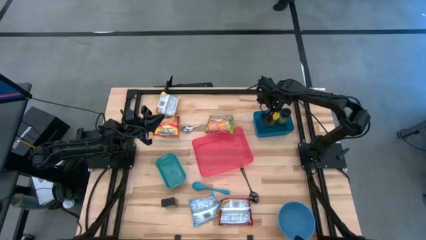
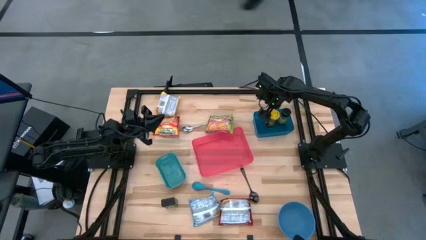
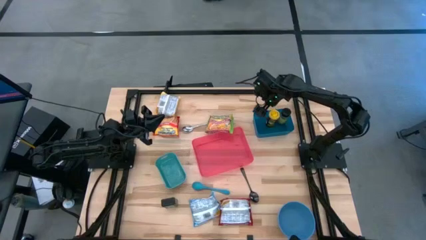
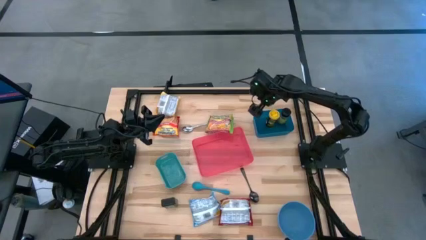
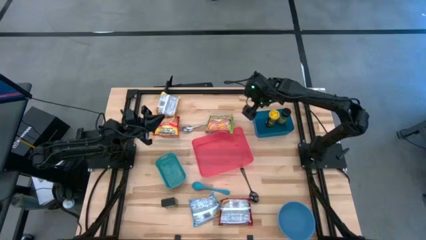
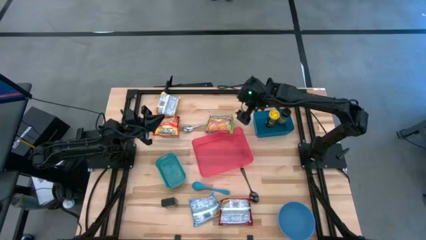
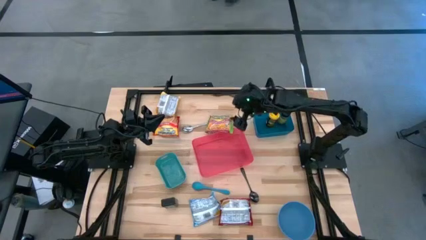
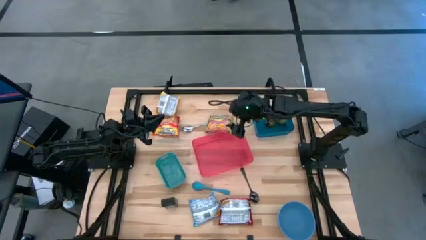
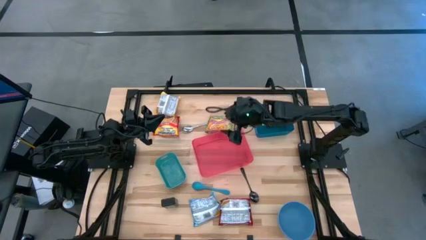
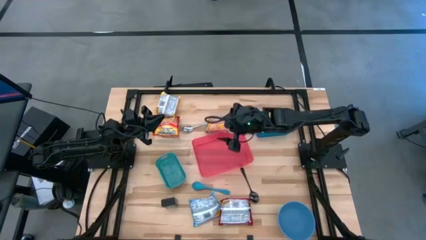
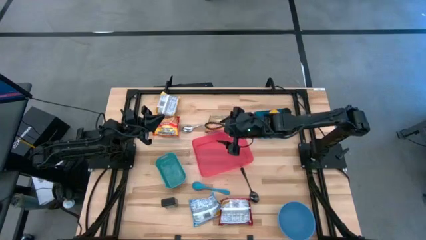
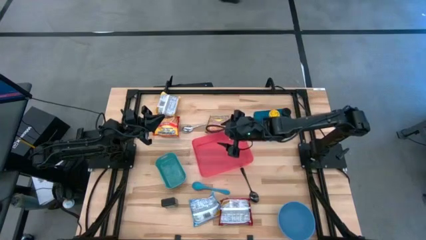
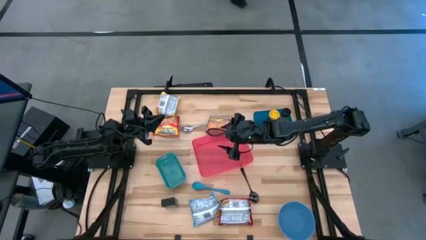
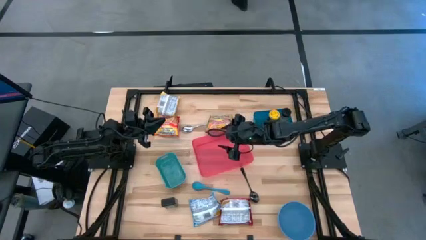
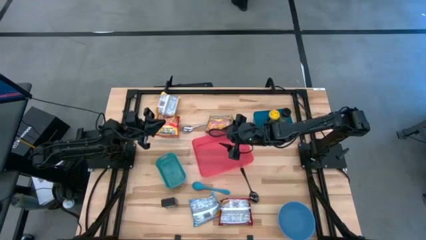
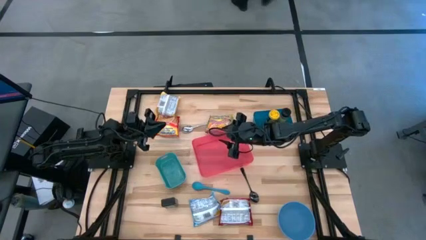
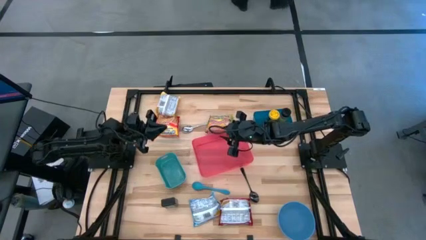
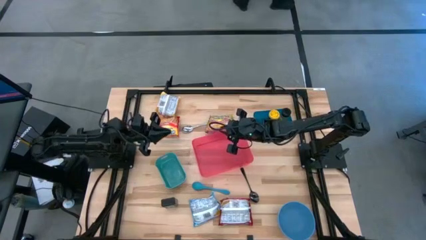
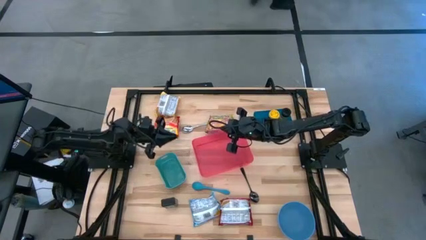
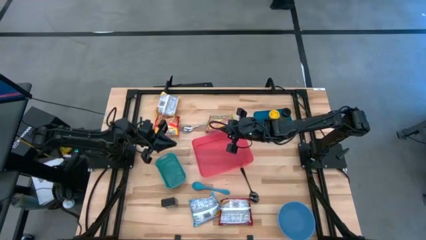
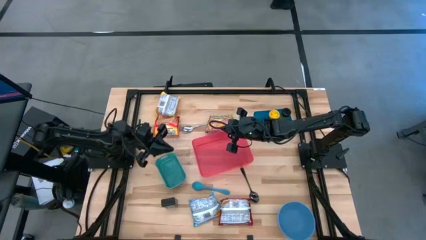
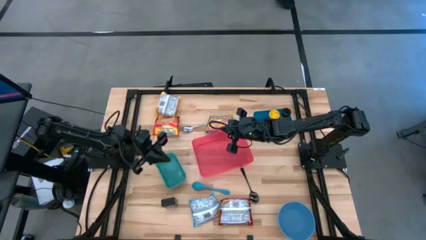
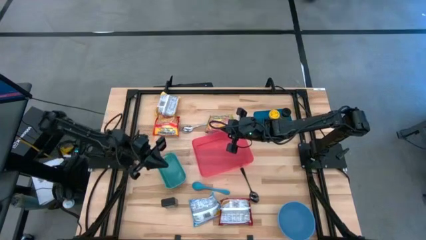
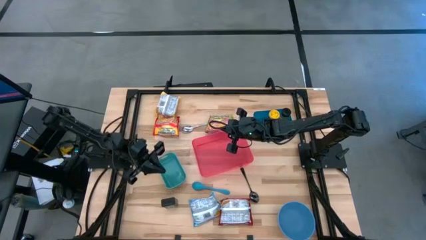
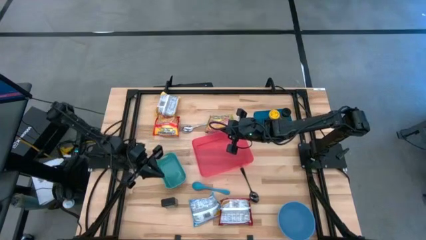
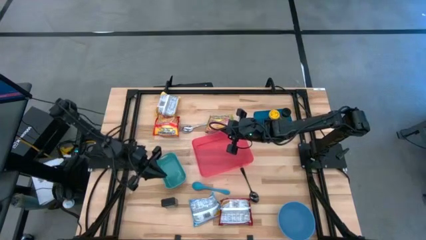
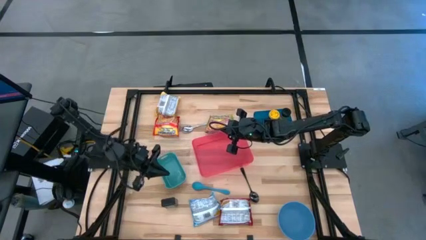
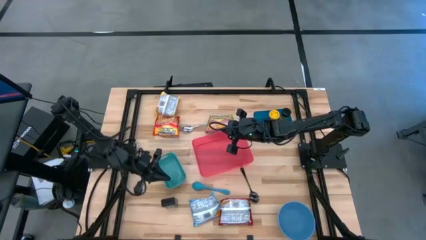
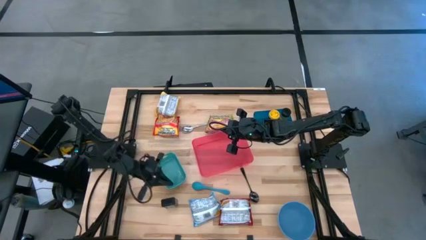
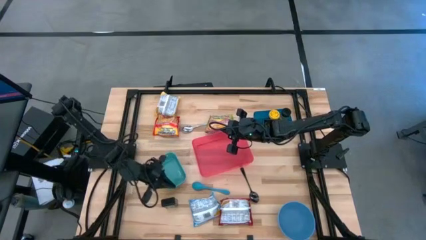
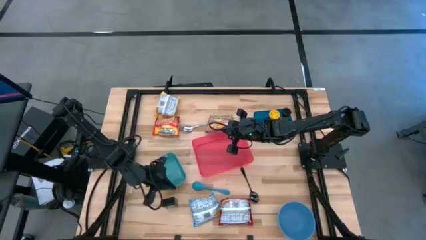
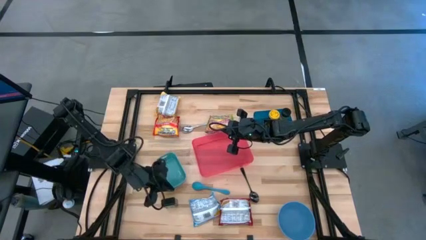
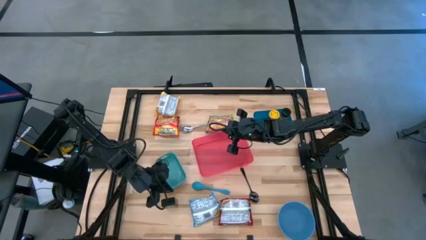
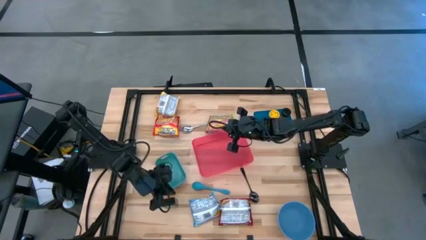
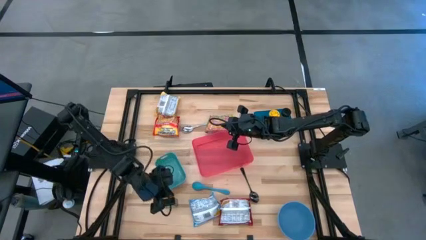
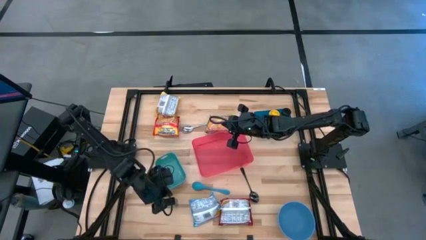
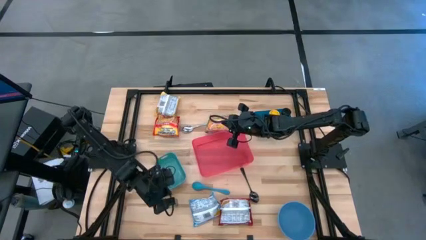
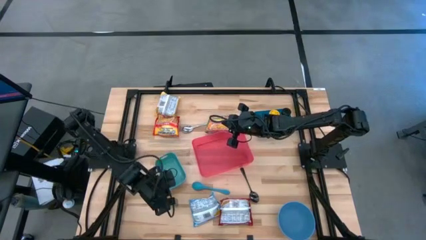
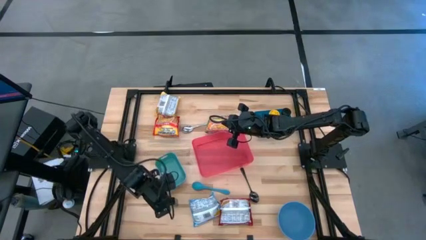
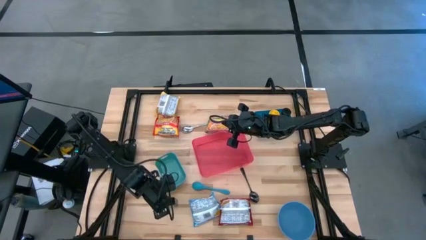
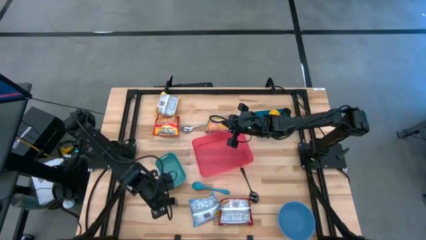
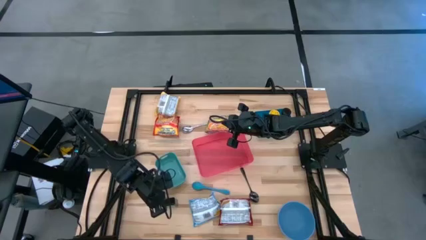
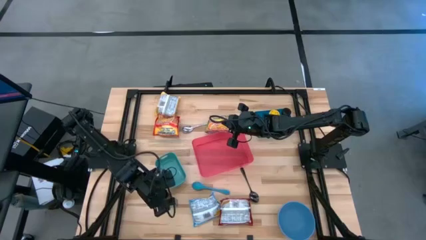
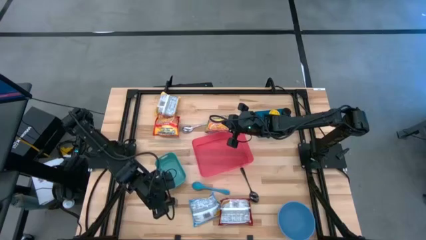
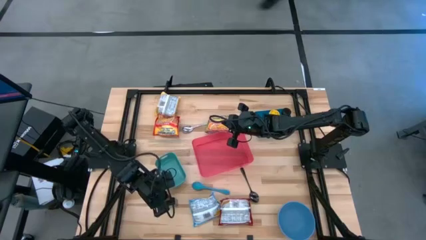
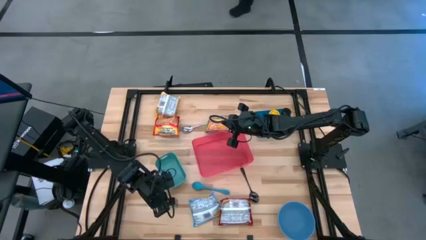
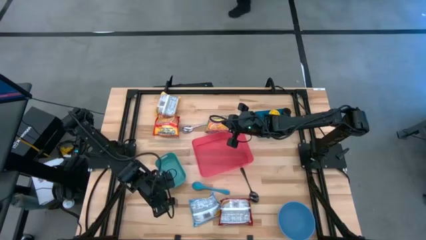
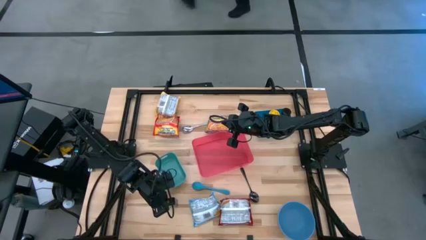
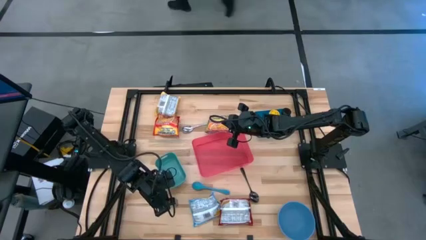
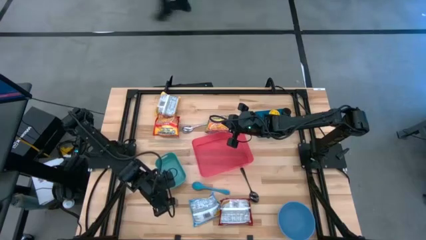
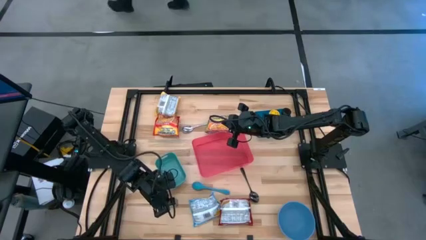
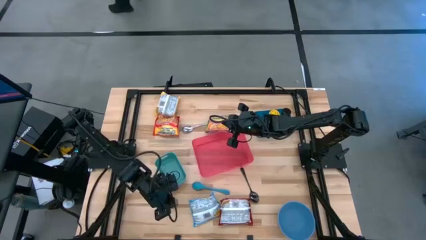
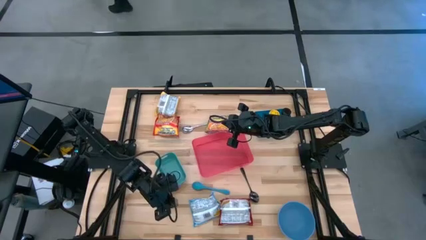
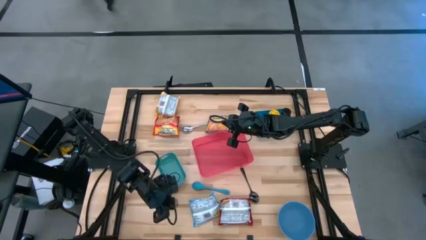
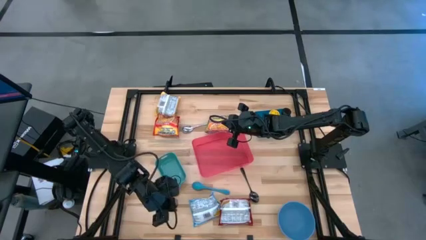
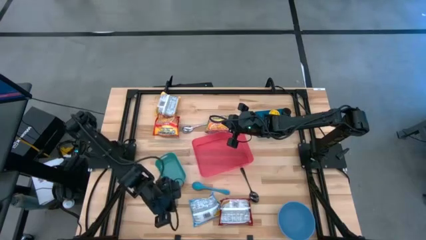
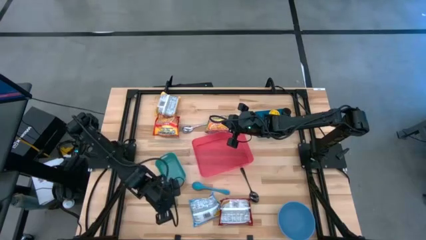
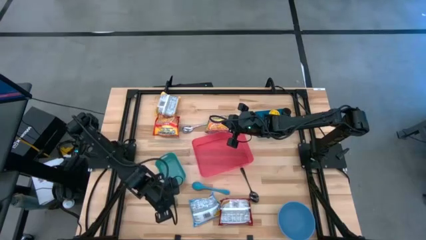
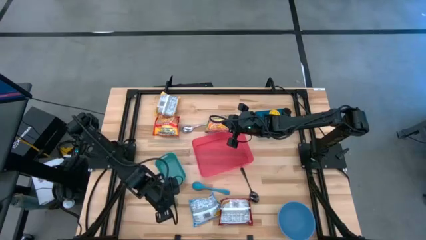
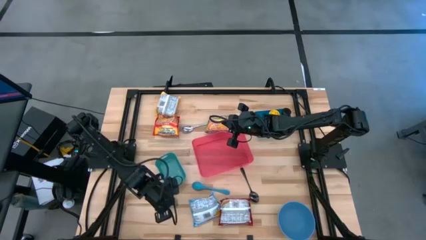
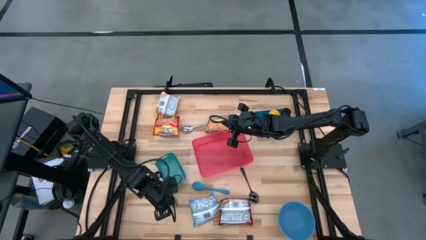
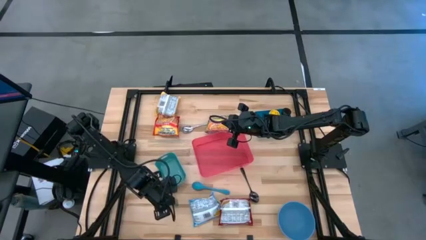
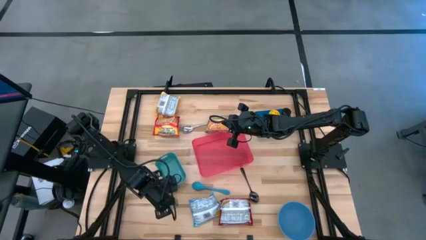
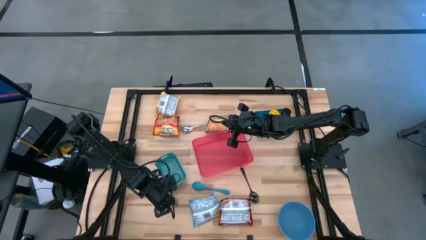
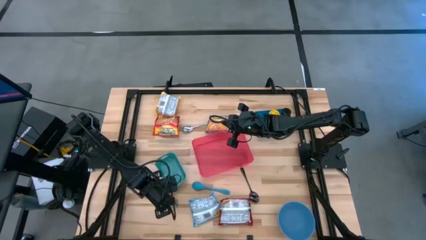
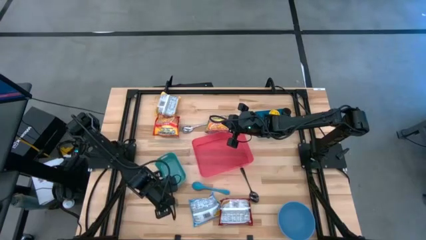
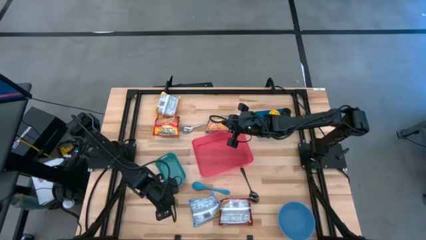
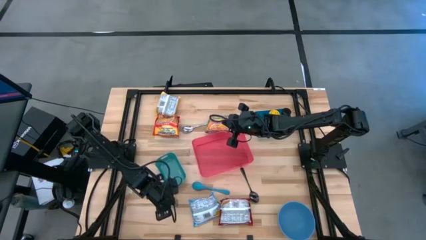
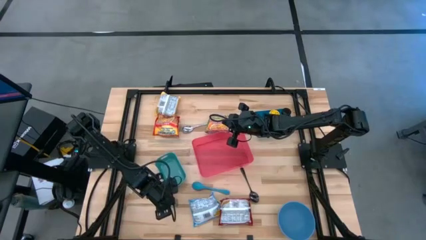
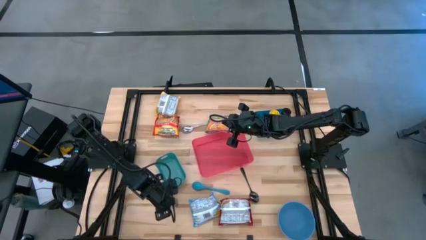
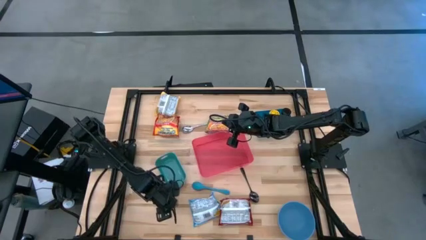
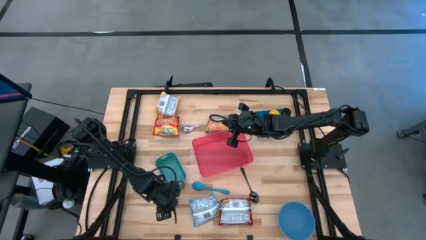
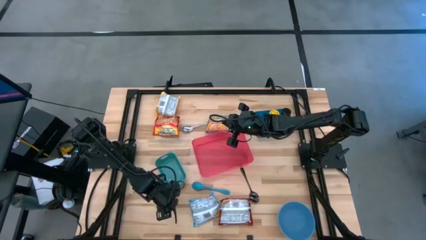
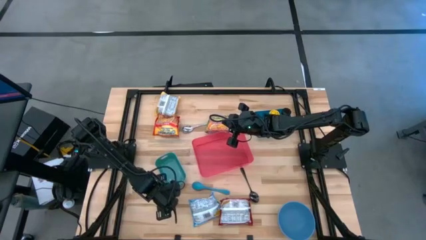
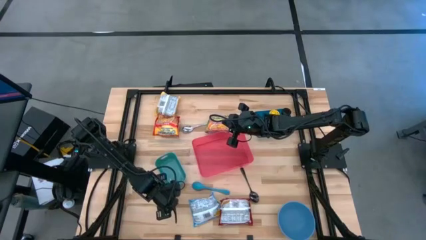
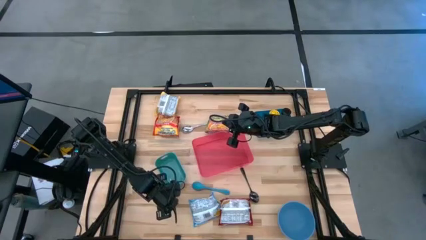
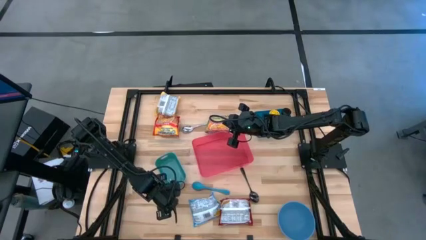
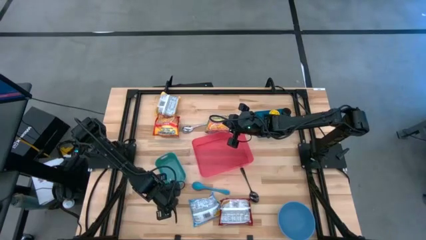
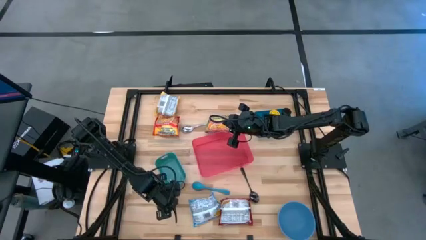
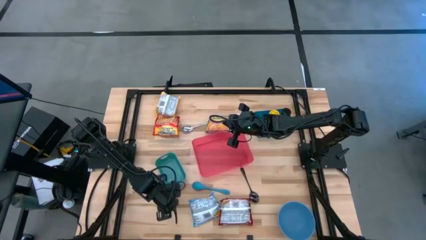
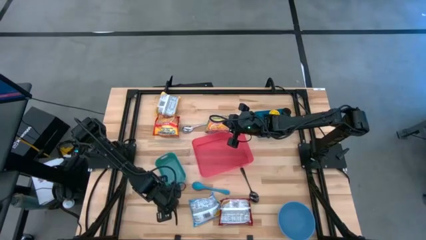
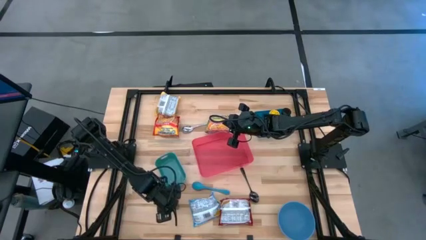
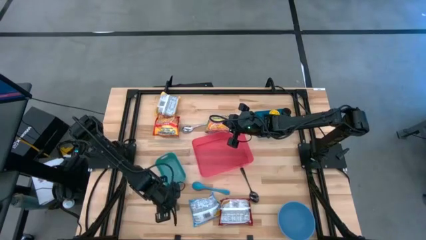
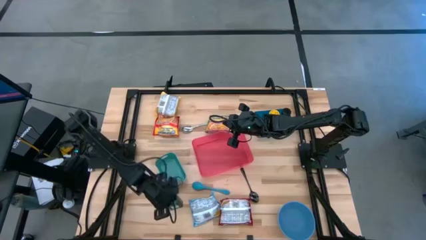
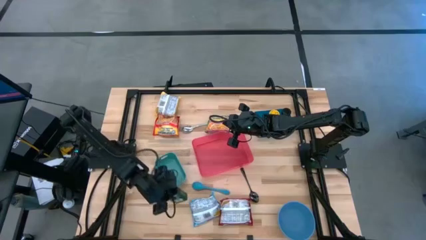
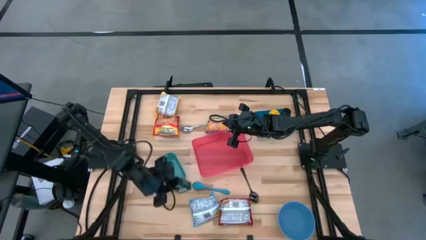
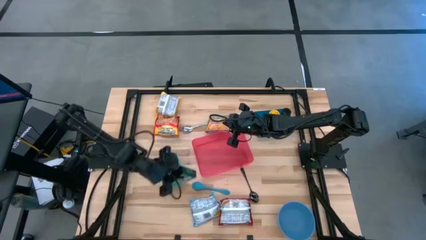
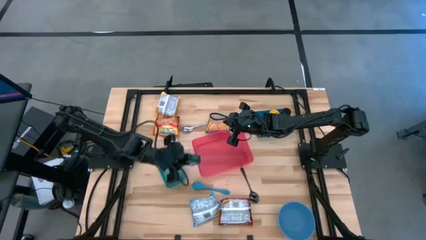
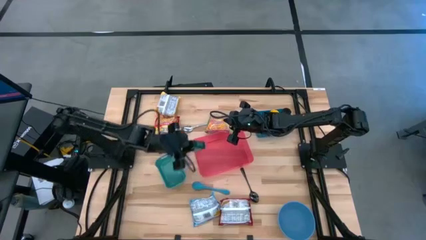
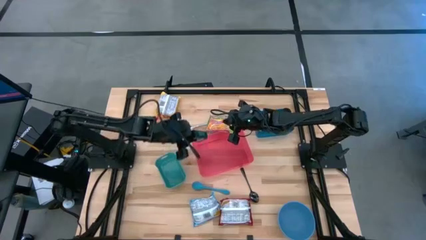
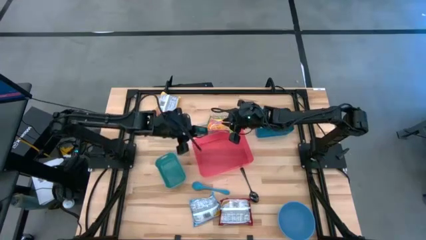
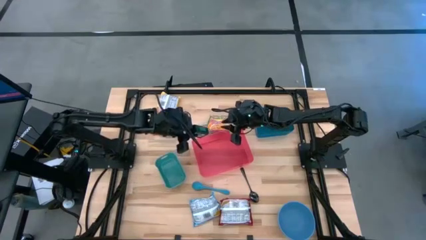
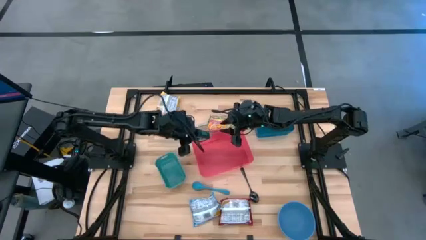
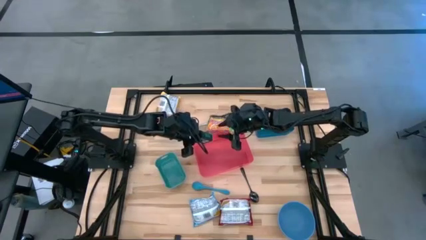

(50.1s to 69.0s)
Task: Pick & Place Food Item
Put the green seasoning can into the blue bin
